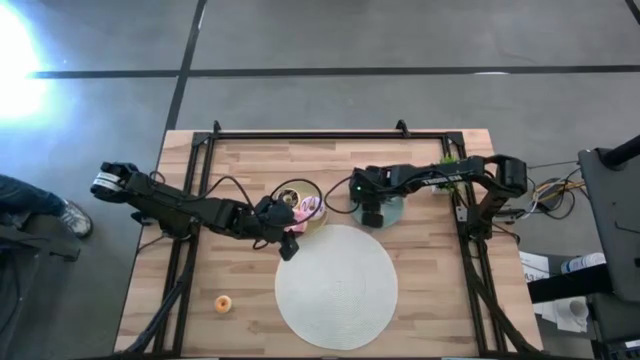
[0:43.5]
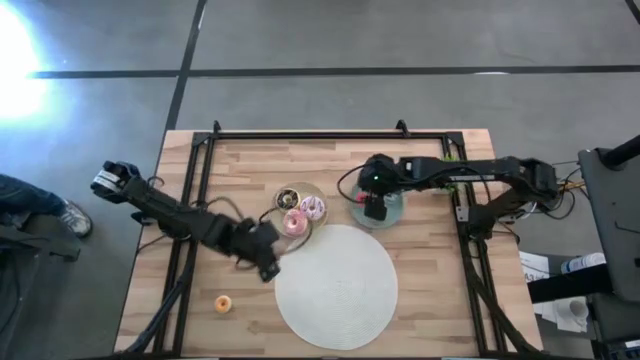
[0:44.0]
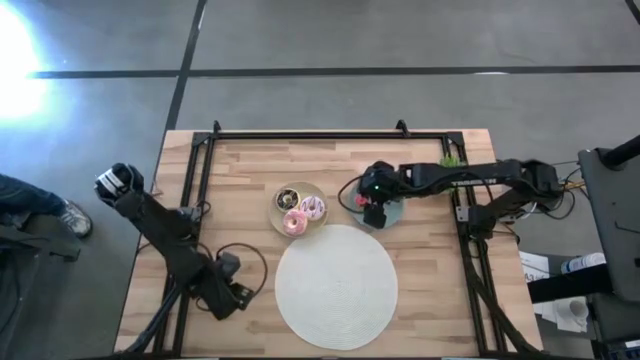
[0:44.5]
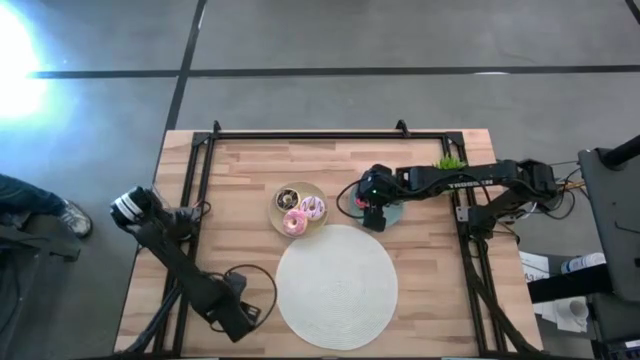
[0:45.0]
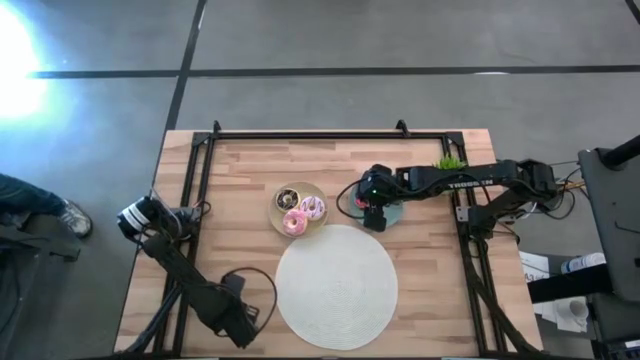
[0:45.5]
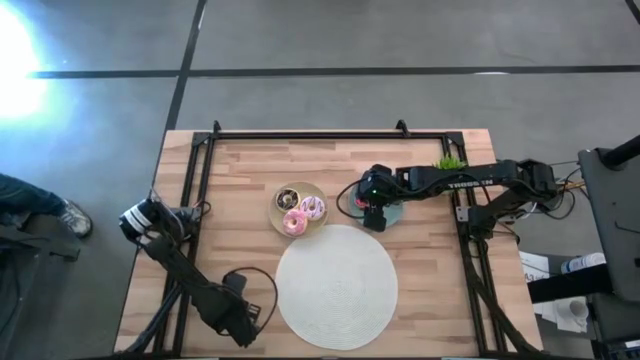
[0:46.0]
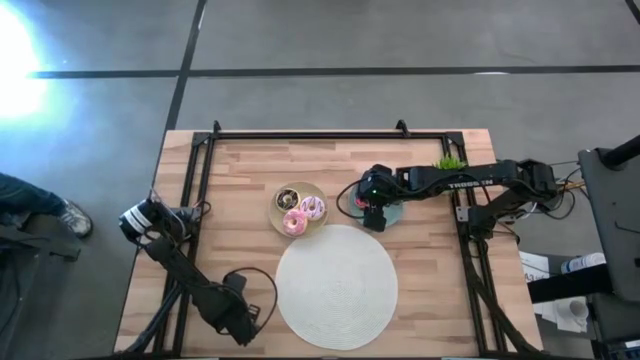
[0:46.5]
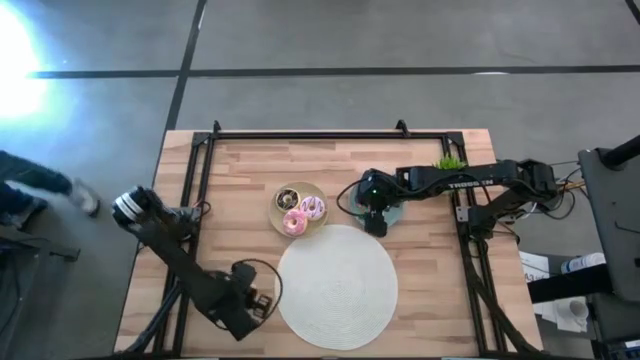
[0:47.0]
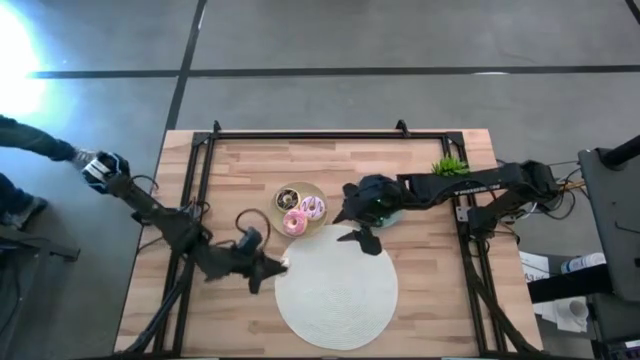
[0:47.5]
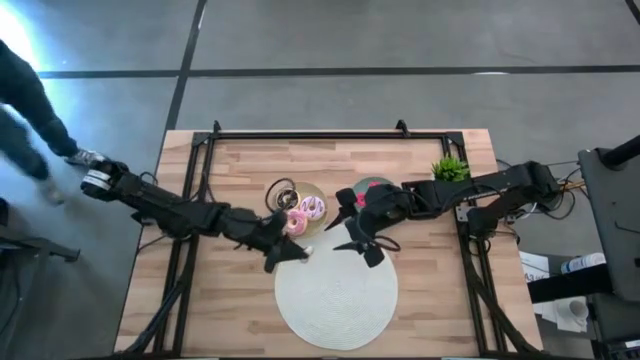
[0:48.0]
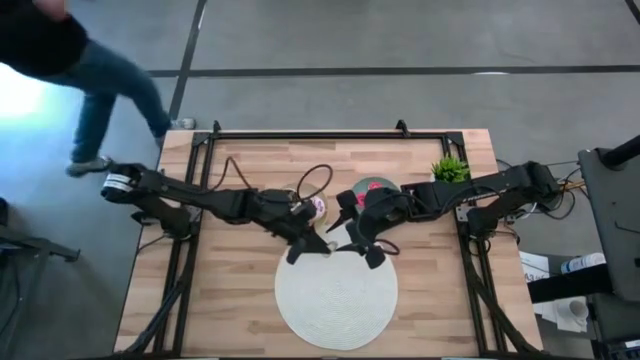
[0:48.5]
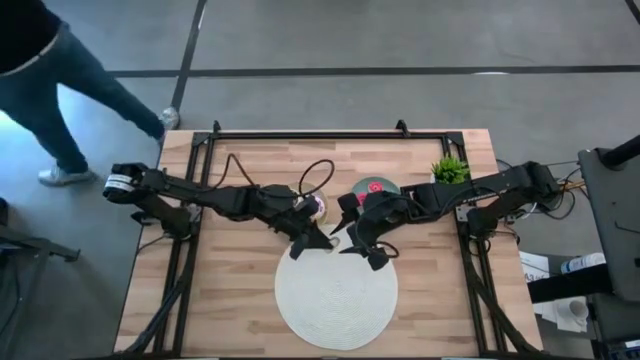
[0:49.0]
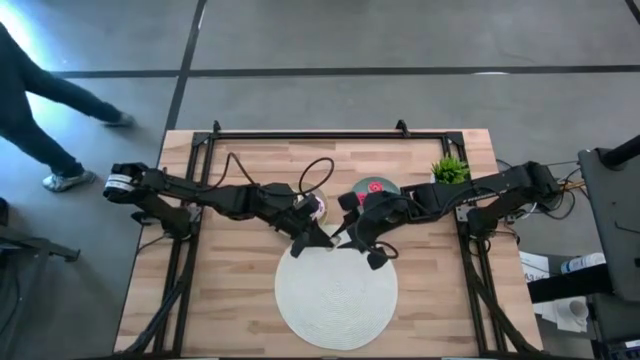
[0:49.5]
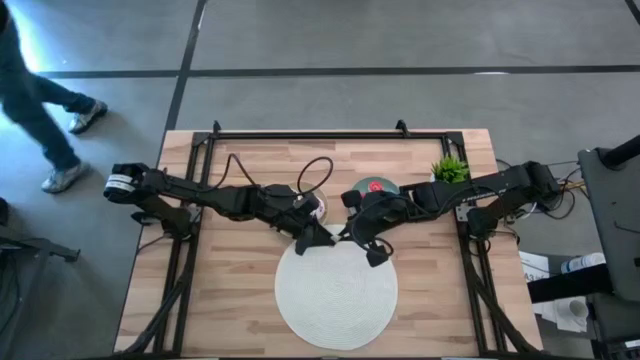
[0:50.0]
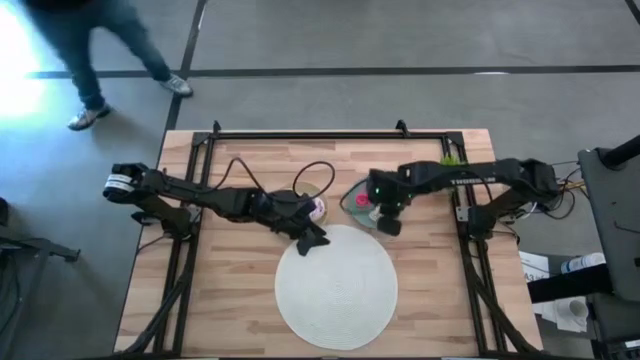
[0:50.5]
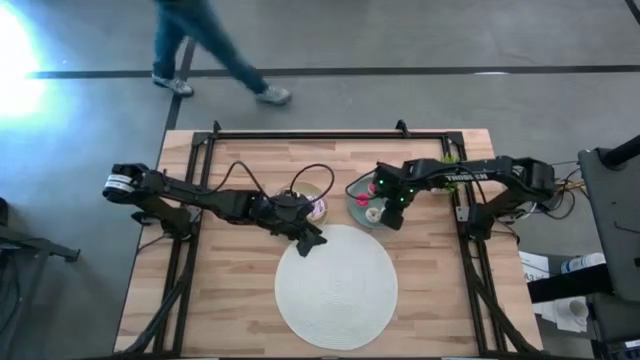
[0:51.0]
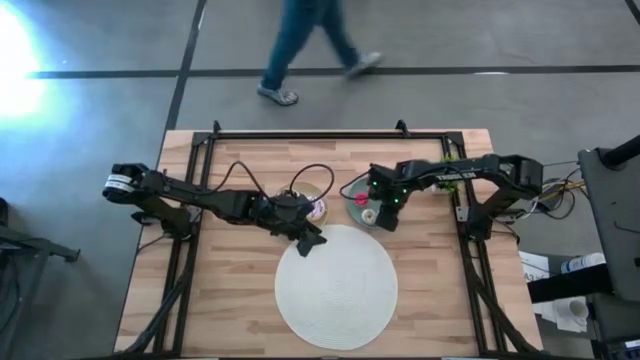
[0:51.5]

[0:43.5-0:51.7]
Task: Pick & Place donuts
Put the small yellow donut on the light blue plate

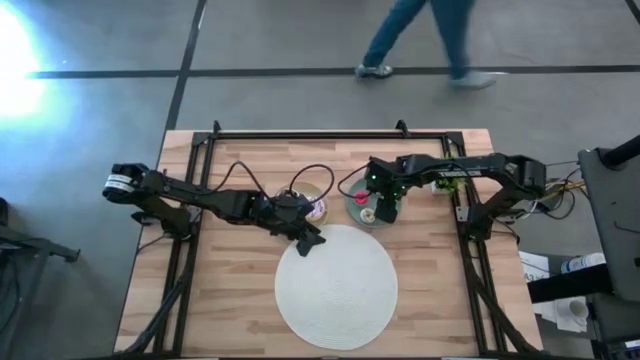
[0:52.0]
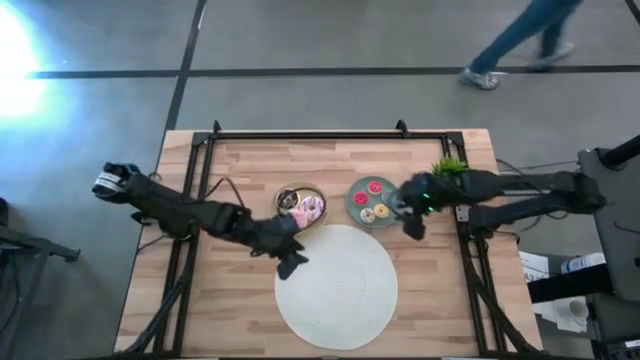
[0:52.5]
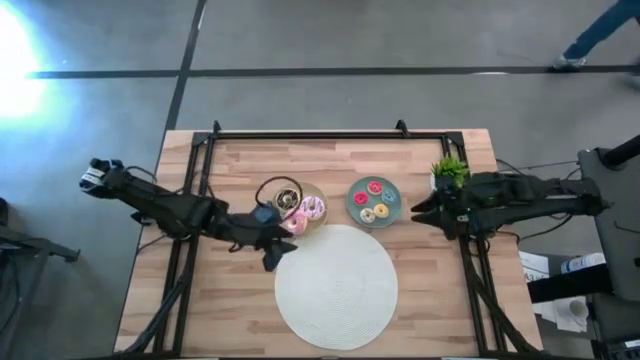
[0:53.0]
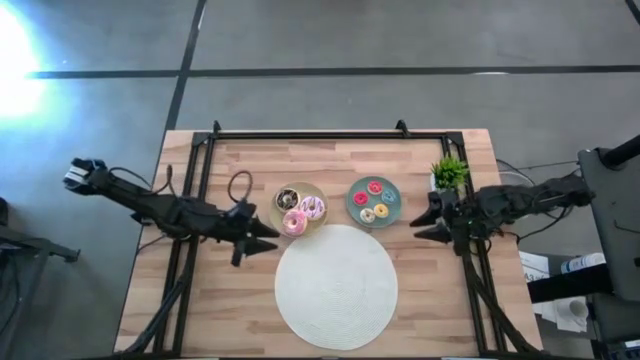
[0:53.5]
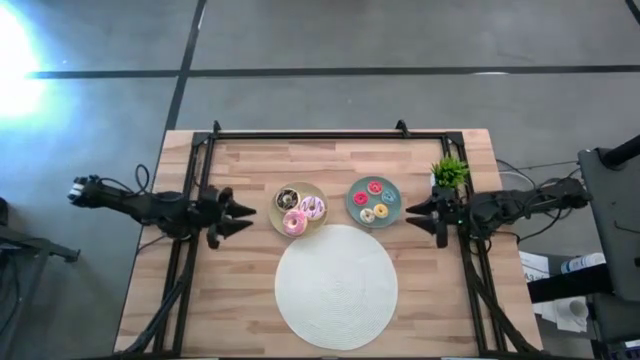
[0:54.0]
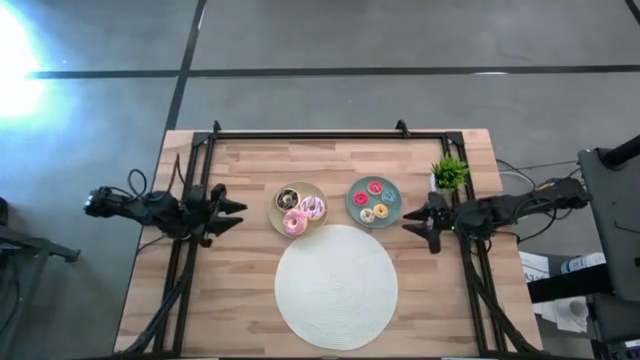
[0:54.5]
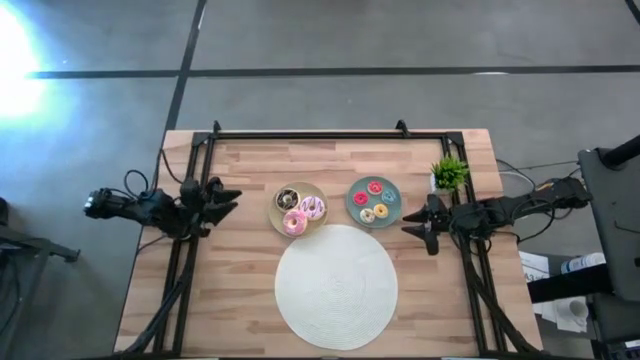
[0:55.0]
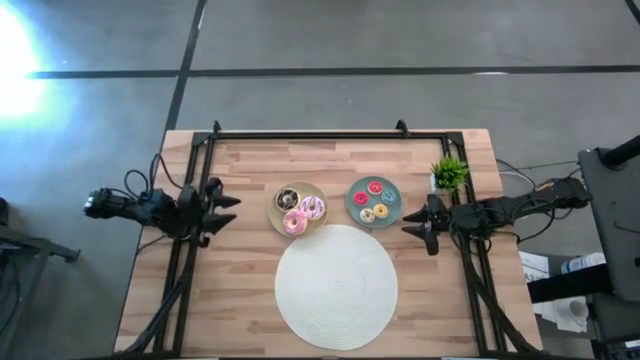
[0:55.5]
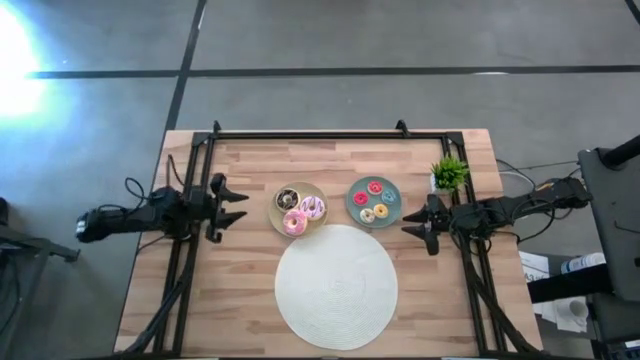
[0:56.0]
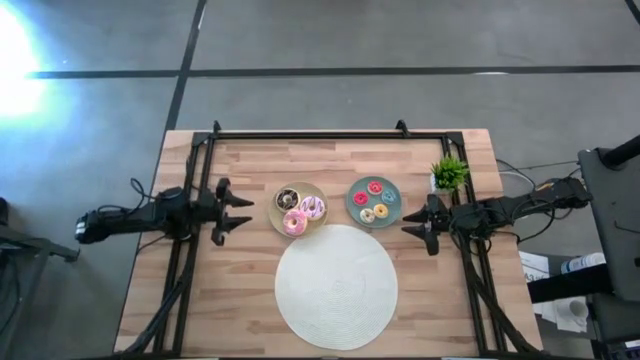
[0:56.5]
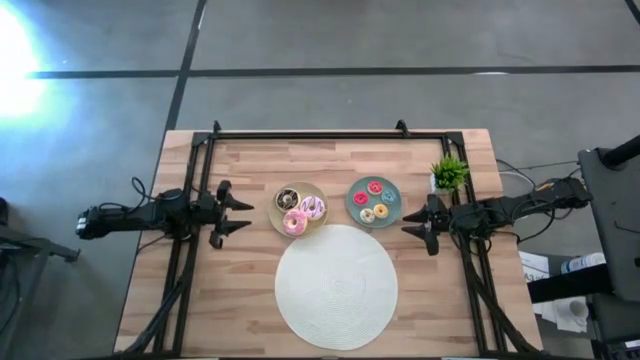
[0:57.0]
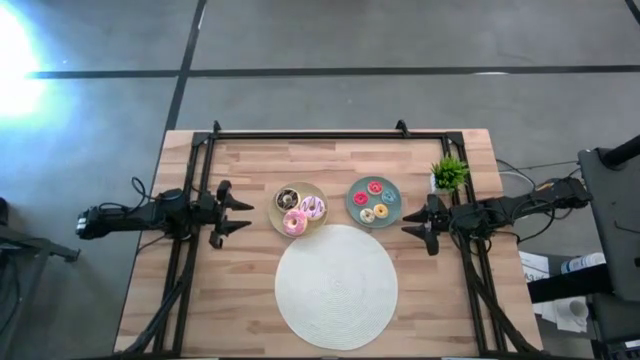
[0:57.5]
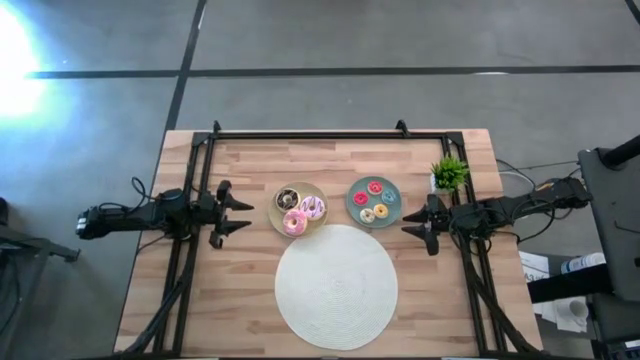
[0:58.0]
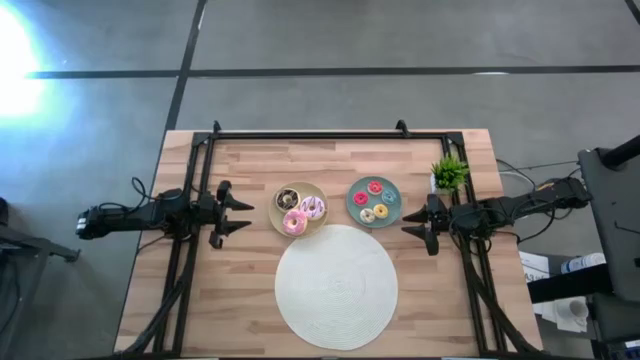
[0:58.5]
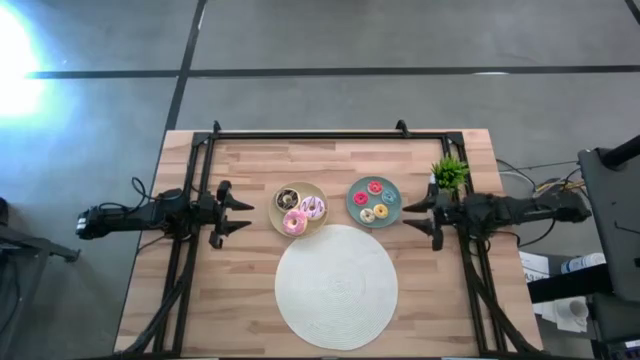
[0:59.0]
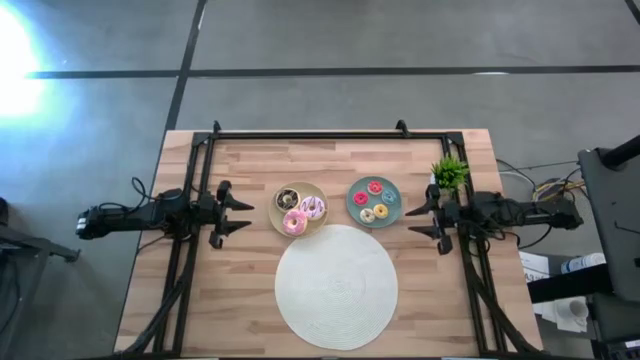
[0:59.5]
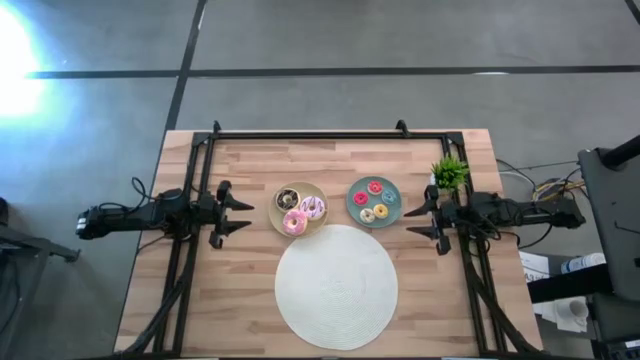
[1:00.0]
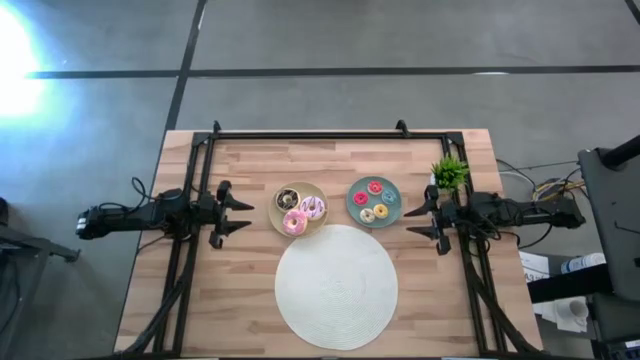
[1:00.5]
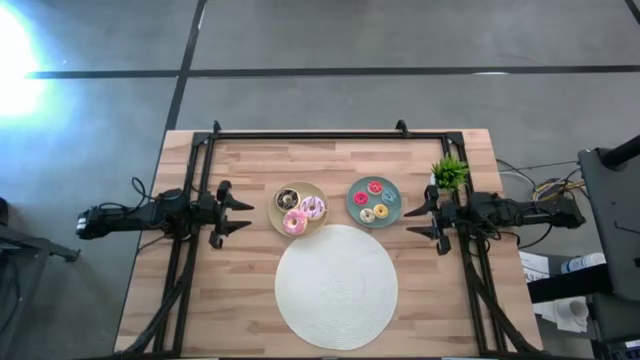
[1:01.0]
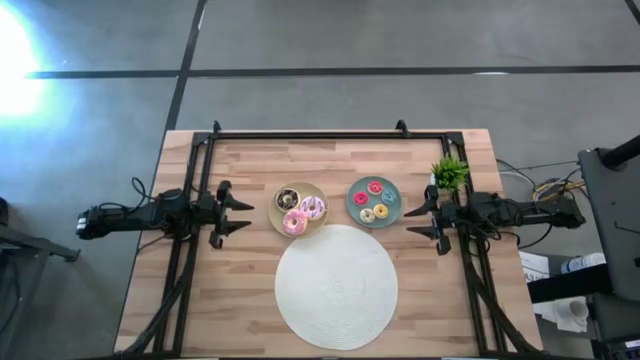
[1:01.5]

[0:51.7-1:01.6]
Return to Home Position
